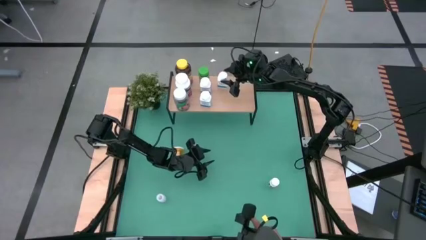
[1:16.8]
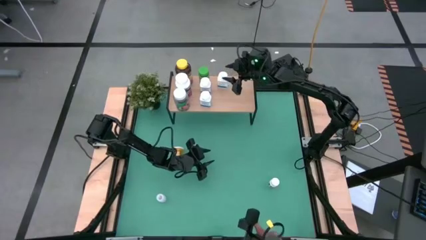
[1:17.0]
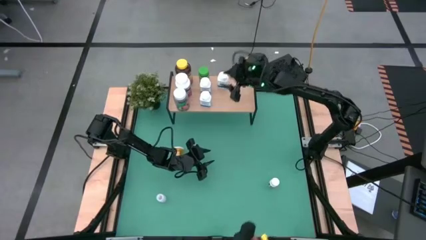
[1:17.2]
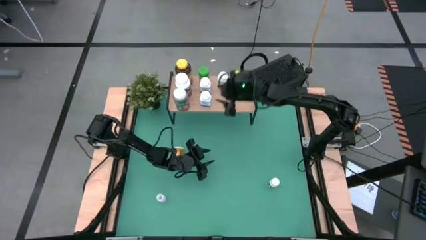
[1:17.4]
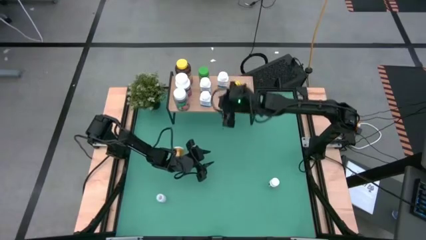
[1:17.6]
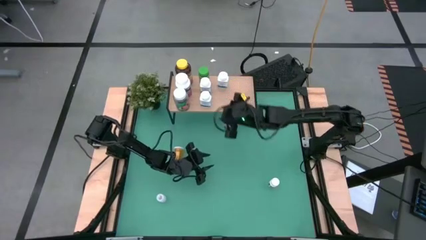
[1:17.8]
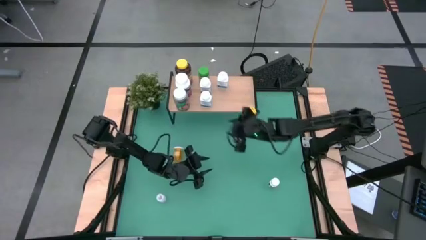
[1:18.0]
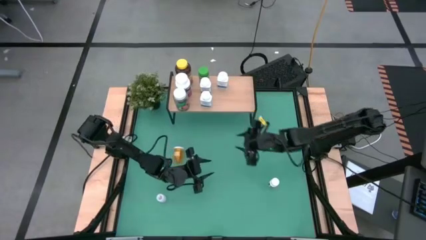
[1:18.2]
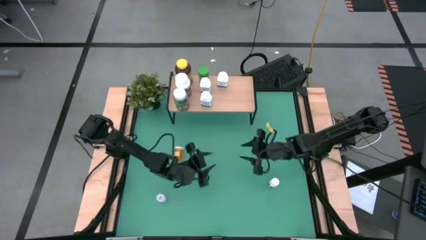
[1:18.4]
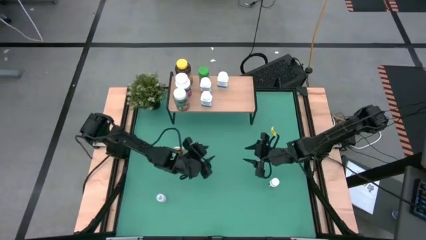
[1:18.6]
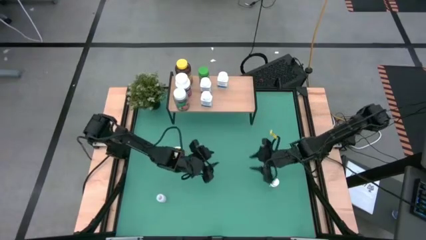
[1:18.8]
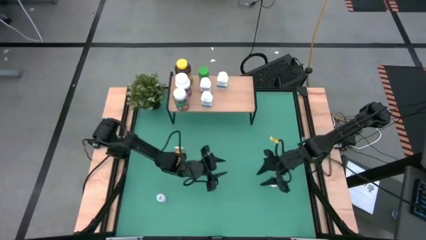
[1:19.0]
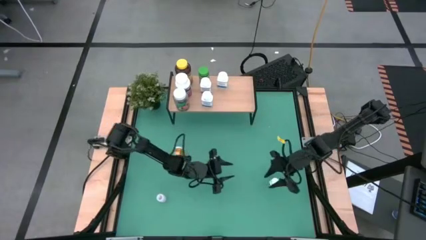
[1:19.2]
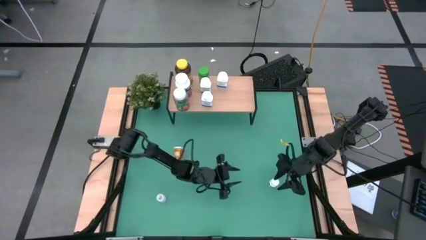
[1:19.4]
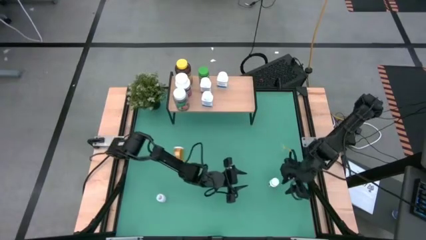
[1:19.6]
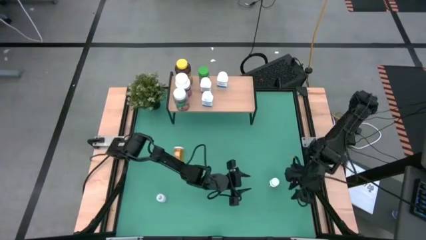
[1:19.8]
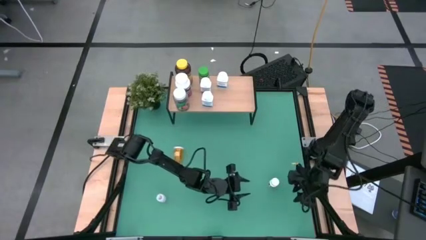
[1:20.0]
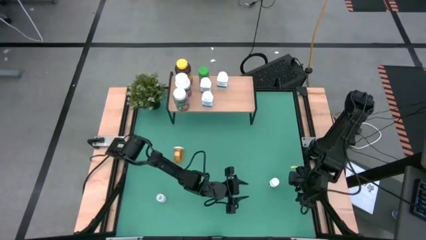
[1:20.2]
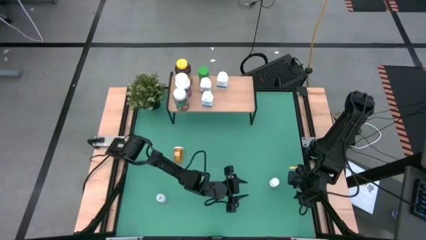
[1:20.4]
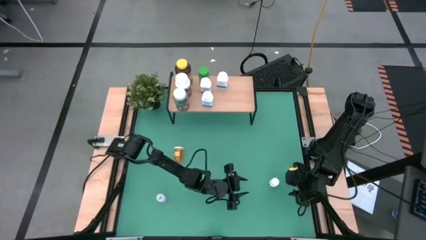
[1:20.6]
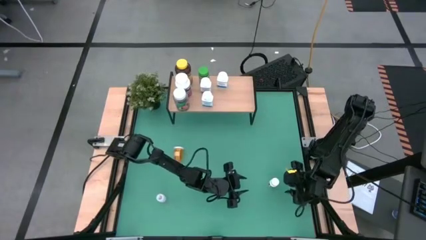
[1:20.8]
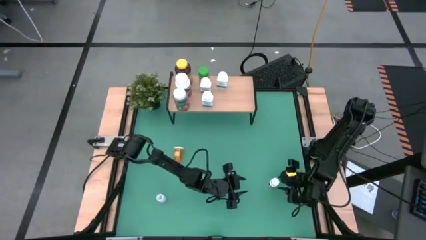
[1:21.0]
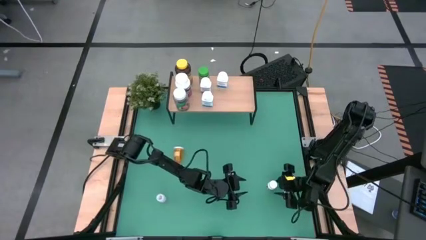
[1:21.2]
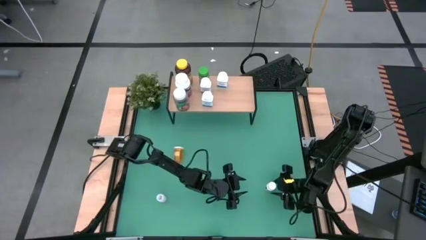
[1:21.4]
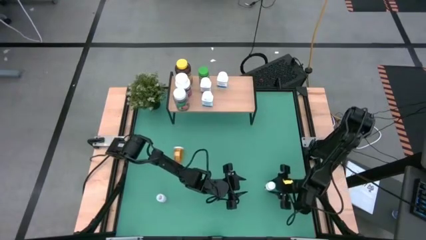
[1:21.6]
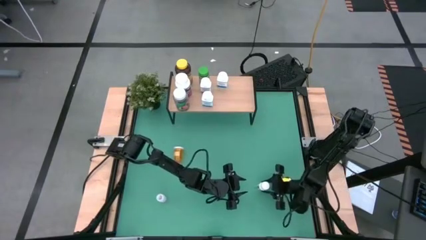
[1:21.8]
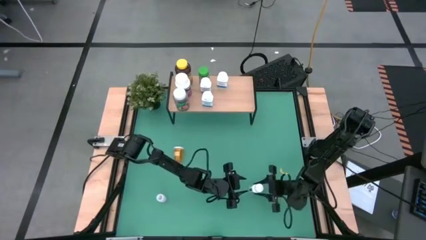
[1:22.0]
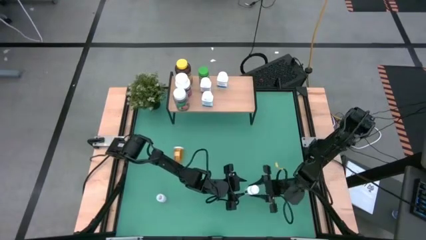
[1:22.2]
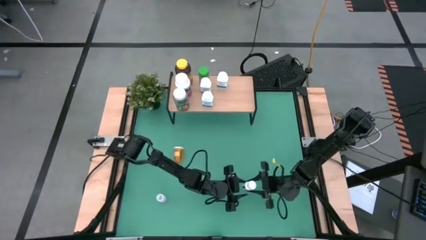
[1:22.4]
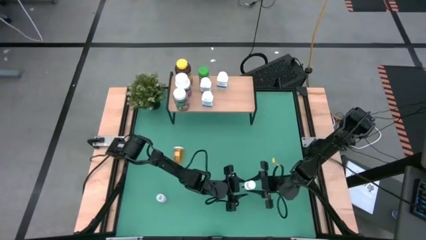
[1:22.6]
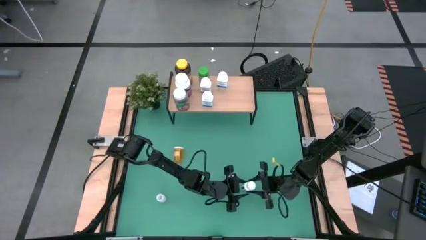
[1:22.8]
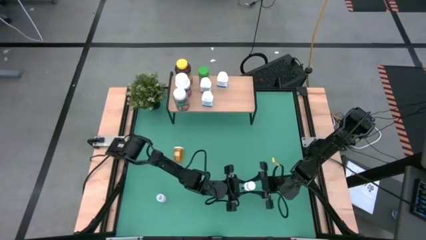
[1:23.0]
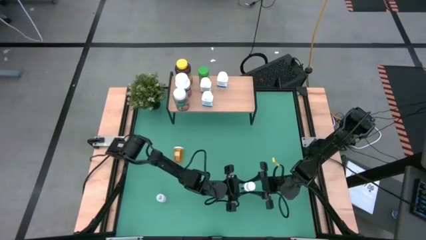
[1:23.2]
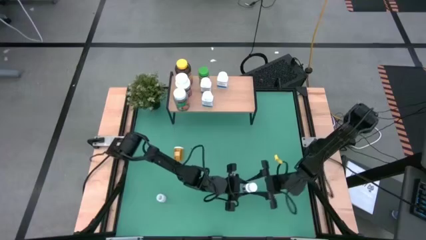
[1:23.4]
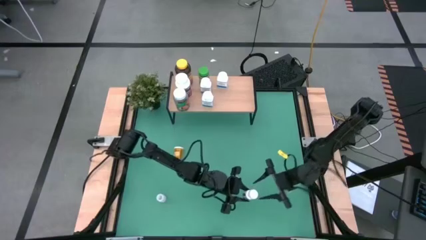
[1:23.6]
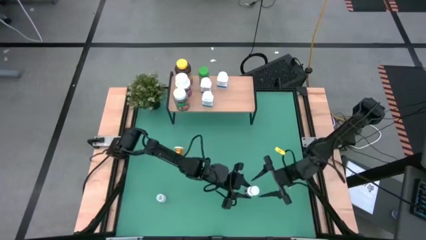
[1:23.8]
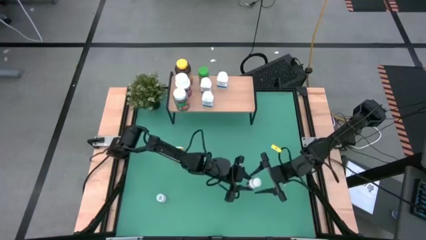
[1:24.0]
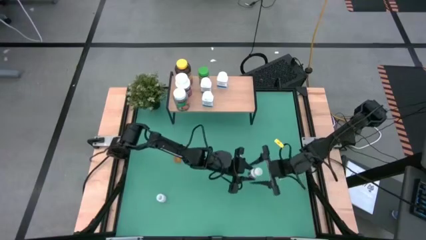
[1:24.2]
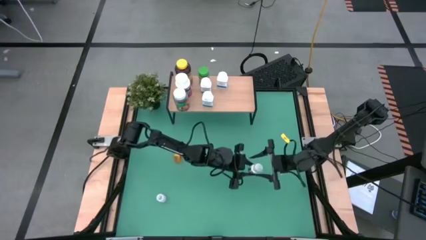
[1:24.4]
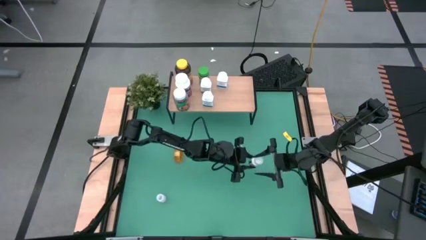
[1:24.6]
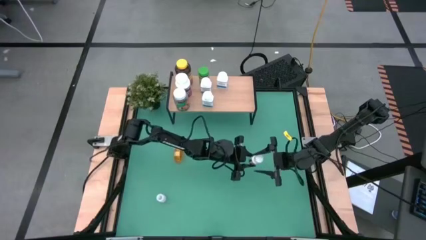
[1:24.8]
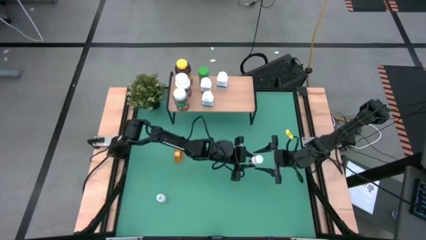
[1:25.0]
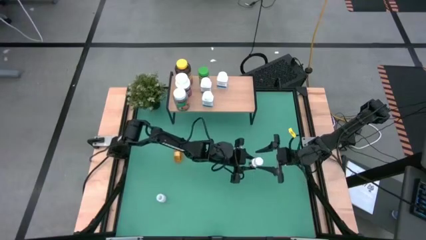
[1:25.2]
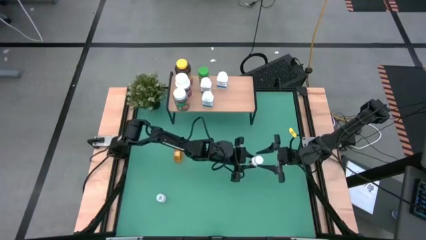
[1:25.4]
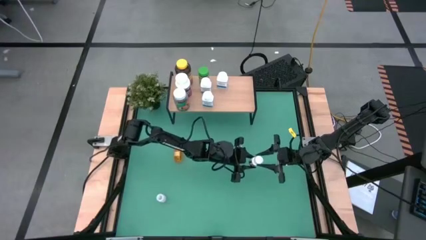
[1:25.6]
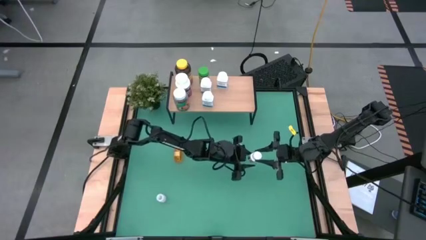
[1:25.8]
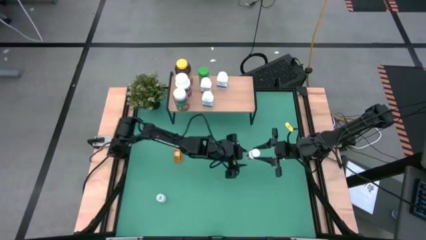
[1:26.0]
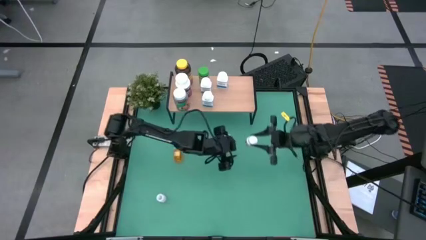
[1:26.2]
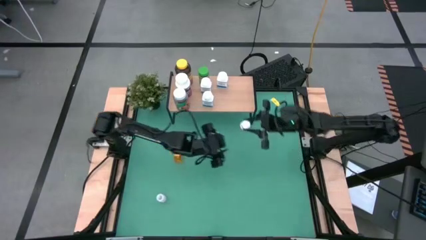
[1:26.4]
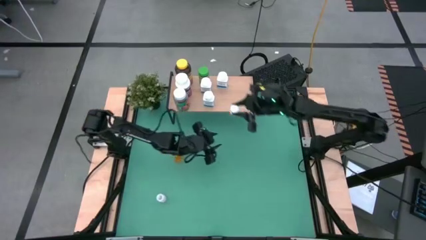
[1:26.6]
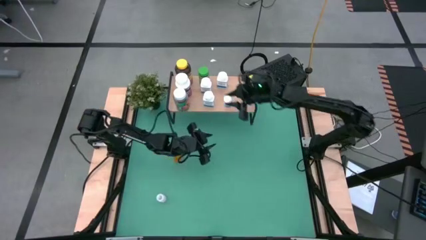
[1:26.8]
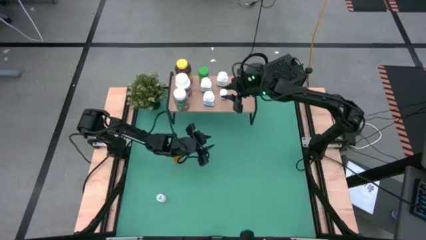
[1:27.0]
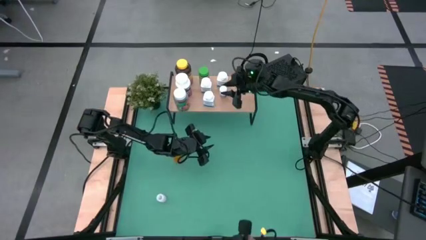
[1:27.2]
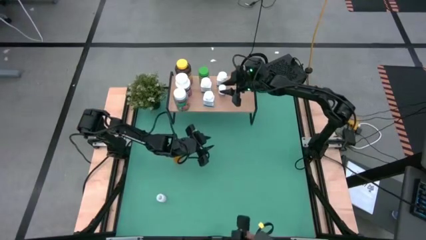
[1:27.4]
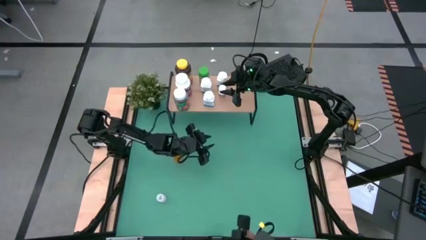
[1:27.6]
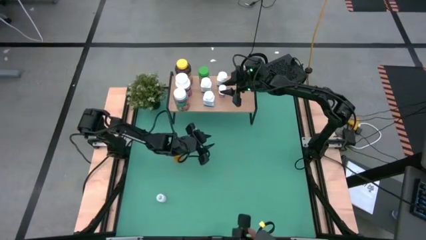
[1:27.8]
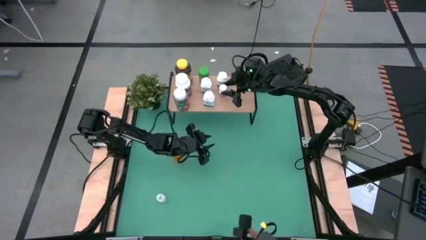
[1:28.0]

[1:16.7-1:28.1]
Task: Pick and place medicine bottles onto shelf by color
Put the white pill bottle on the shelf

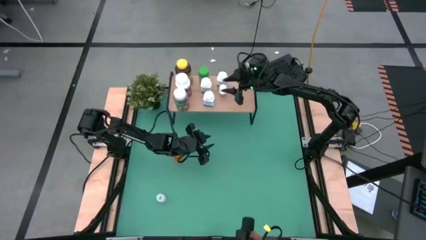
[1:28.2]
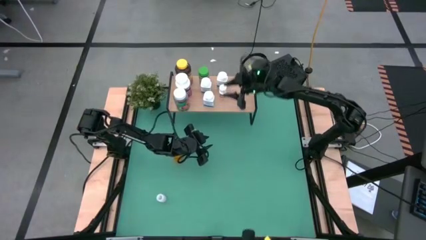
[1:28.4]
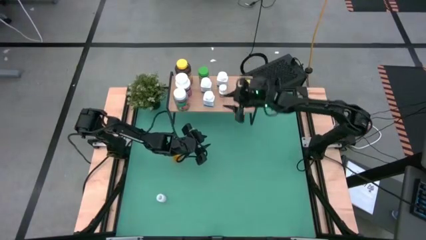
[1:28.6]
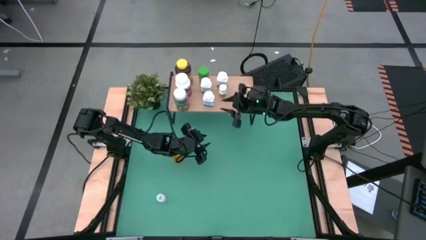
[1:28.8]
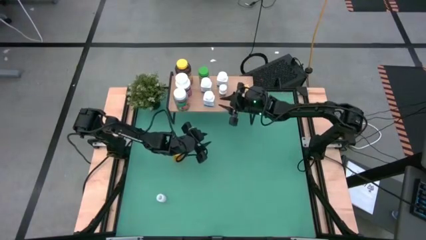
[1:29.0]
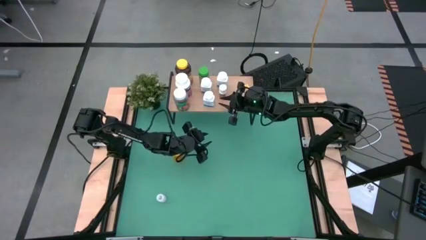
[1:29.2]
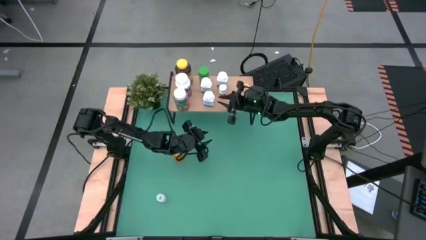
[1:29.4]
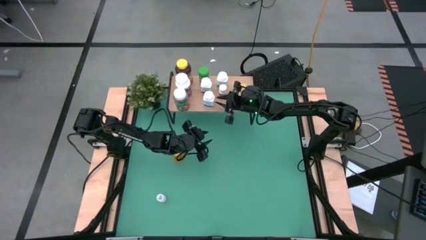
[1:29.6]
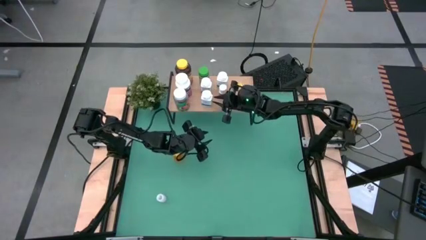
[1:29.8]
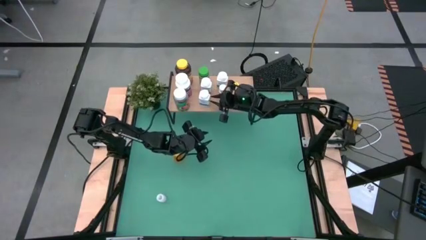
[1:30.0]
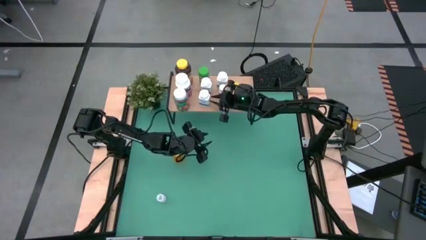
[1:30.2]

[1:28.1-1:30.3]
Adjust the white pill bottle on the shelf

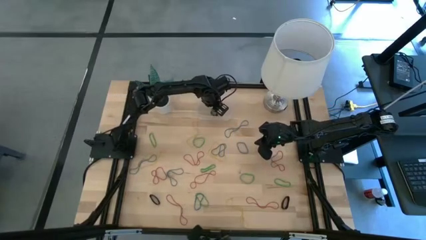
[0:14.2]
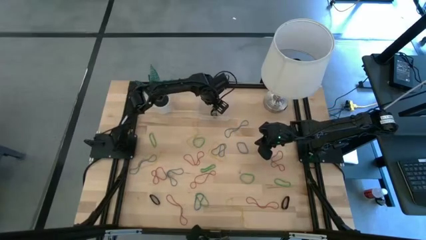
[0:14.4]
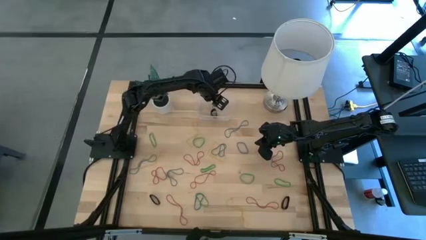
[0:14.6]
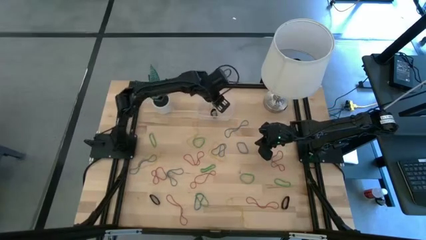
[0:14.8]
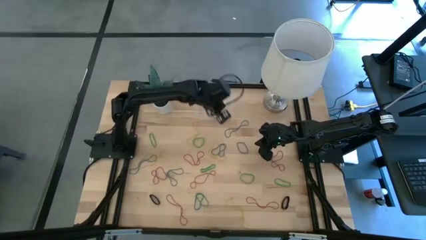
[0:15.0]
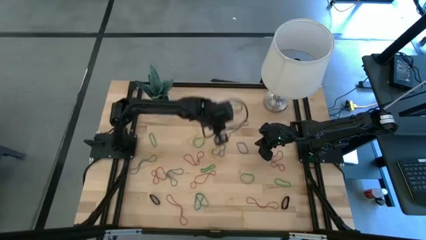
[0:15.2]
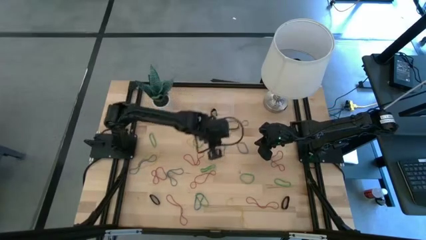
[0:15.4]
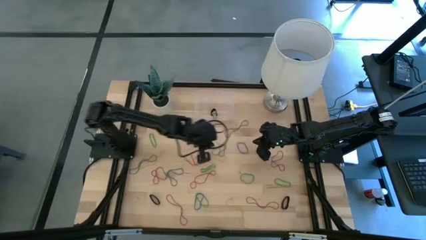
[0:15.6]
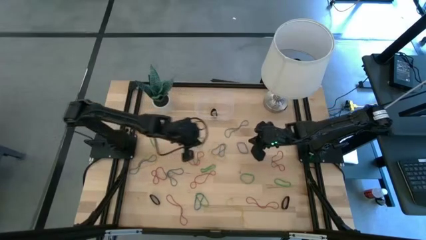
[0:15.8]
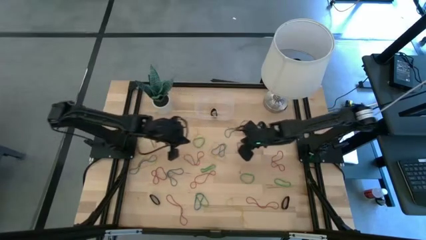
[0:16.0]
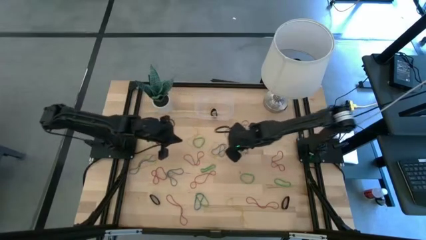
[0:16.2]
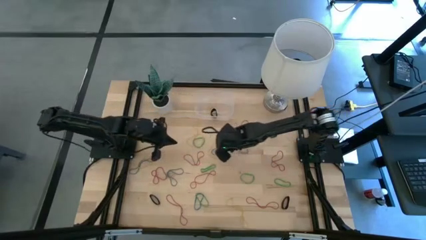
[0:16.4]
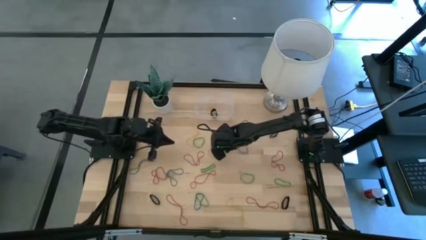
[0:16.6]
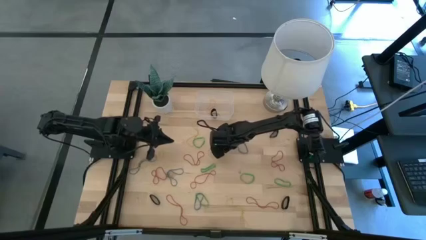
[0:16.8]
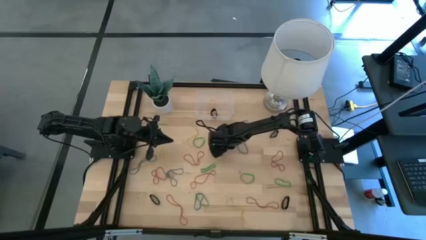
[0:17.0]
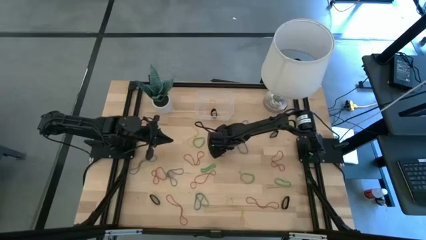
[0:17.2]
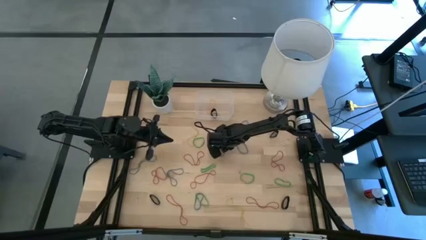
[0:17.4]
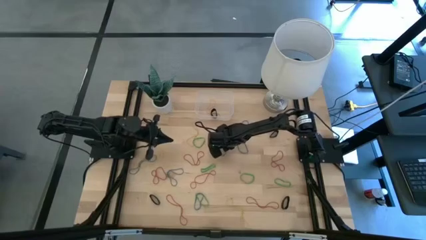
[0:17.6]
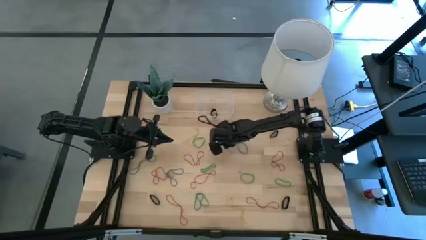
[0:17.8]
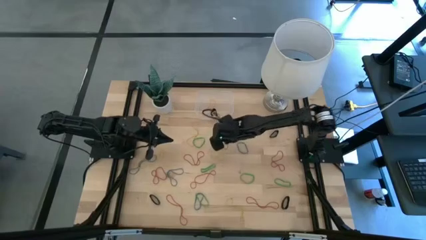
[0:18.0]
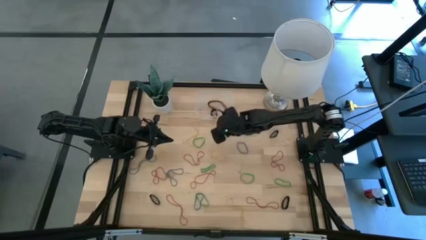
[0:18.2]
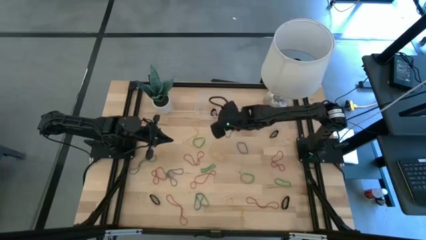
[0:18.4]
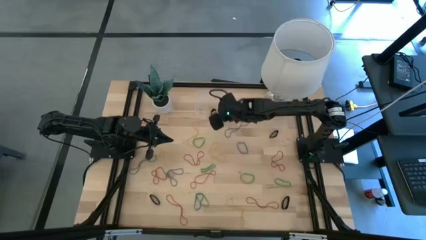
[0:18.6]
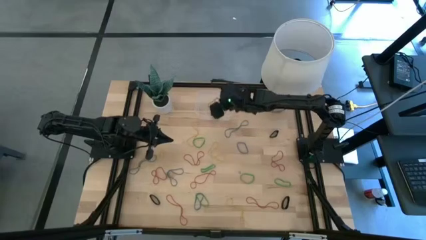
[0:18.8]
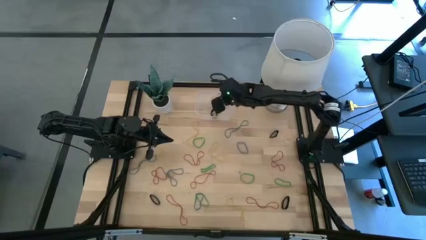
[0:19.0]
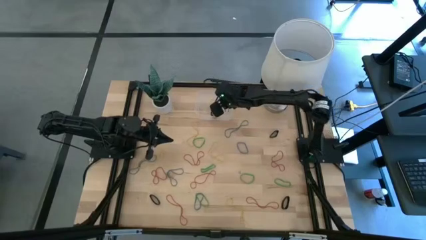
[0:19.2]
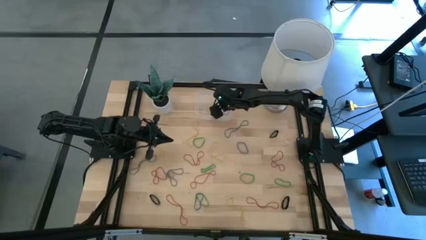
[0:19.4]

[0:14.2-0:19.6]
Task: Pick and place rubber bands into bin
Put the blue rubber band into the transparent bin
